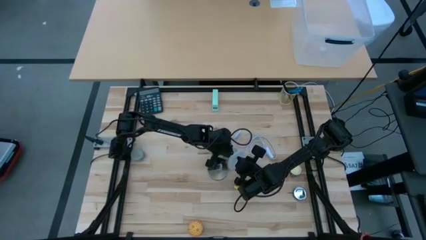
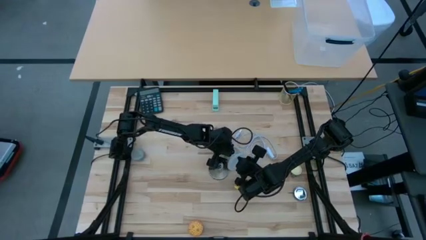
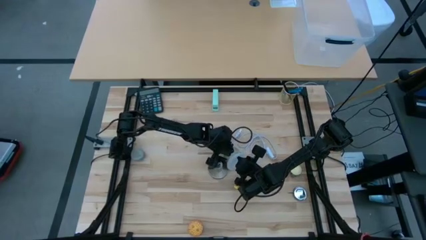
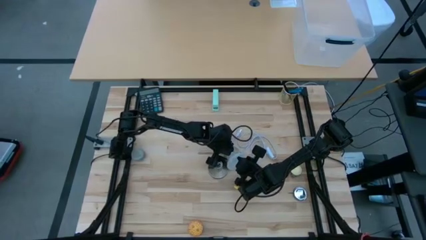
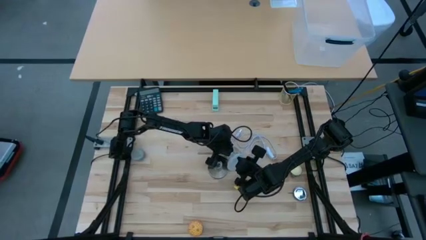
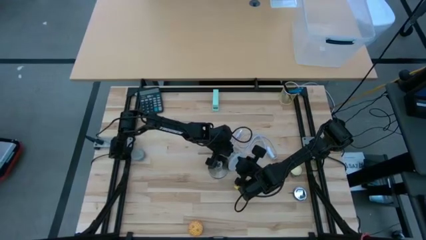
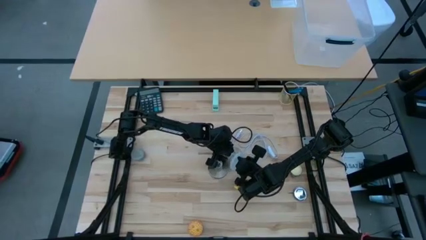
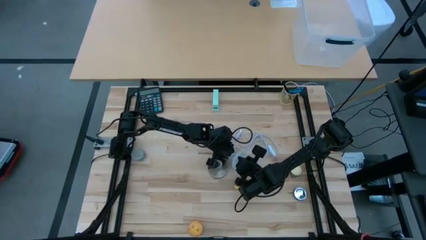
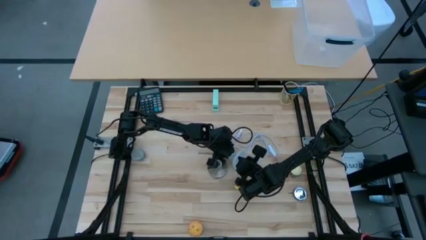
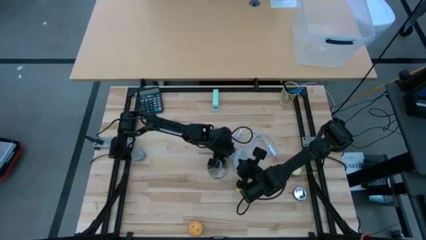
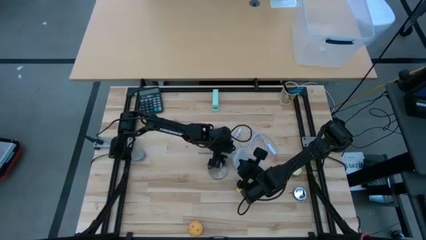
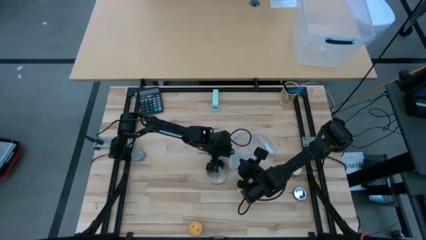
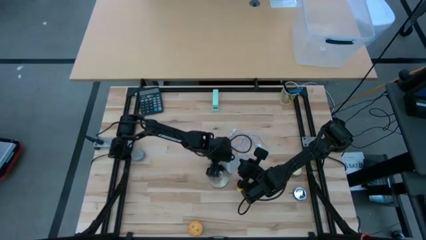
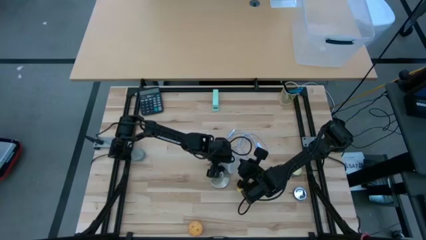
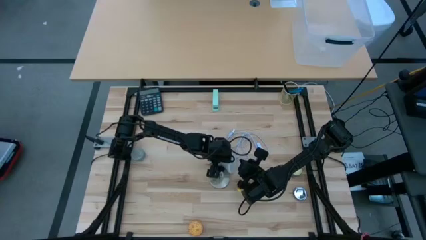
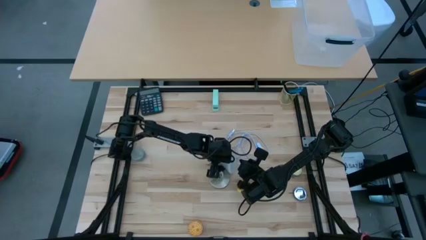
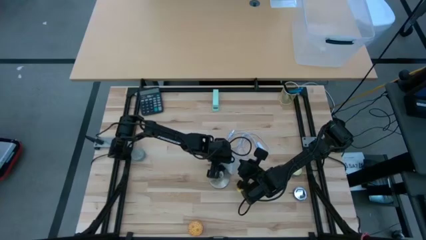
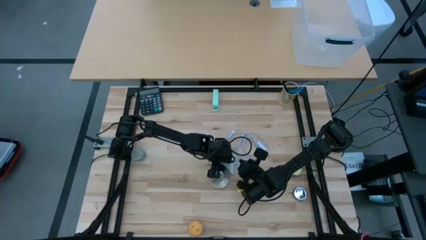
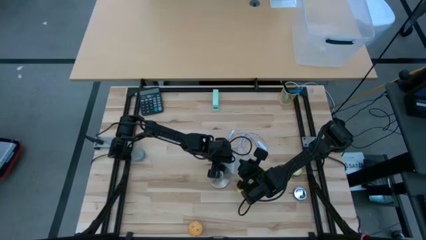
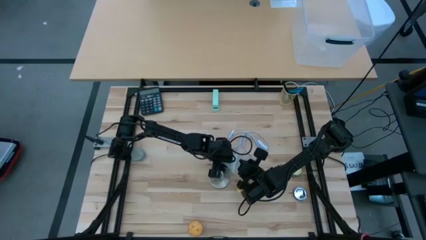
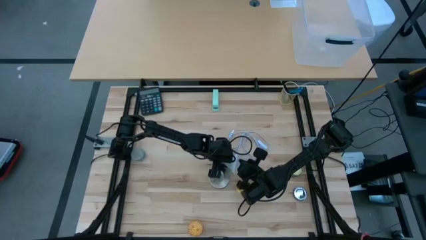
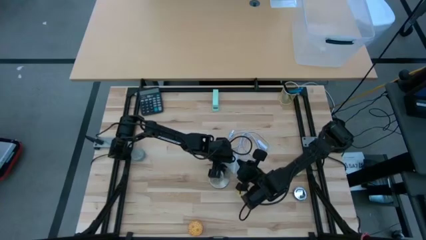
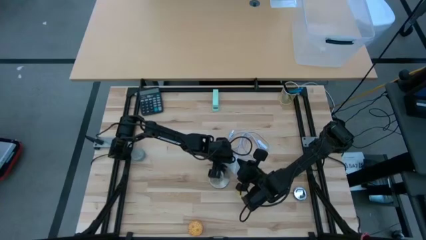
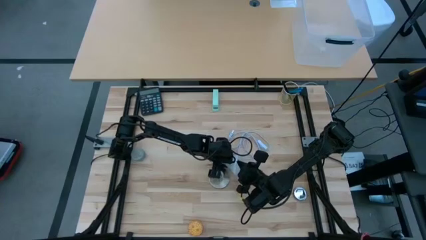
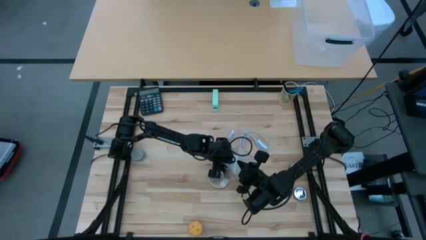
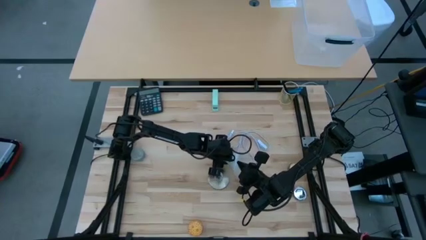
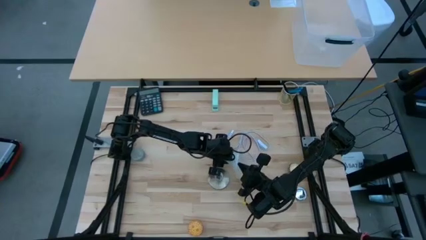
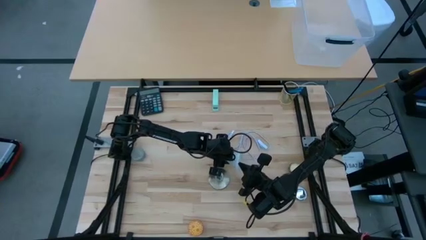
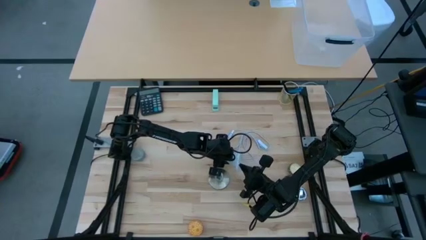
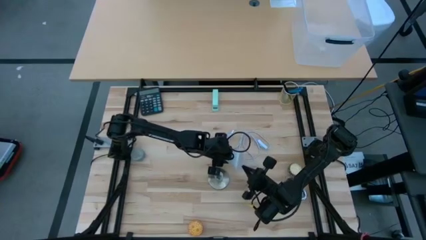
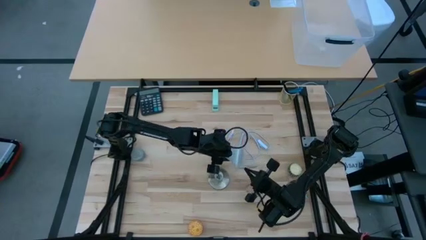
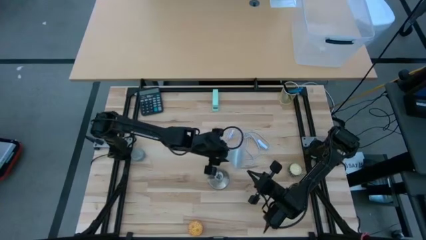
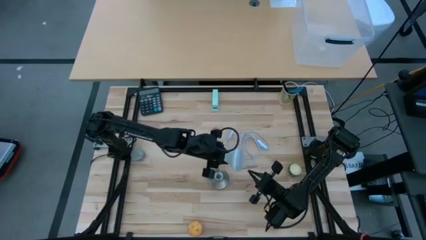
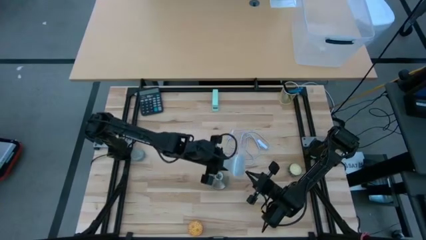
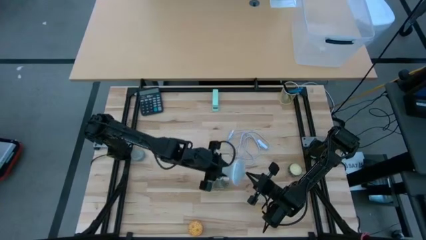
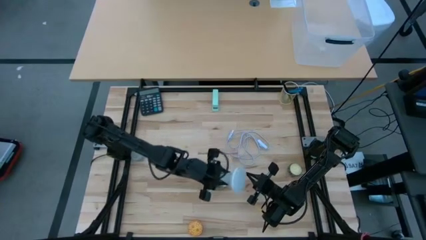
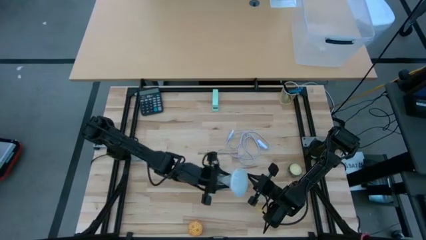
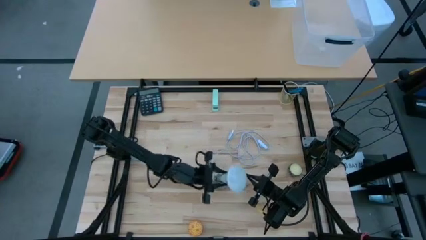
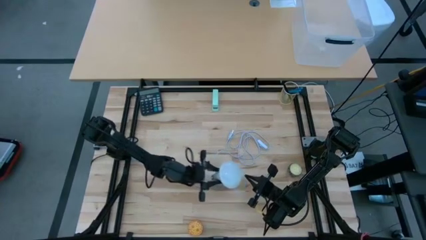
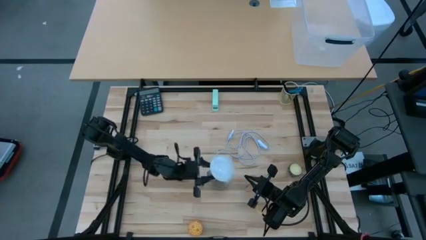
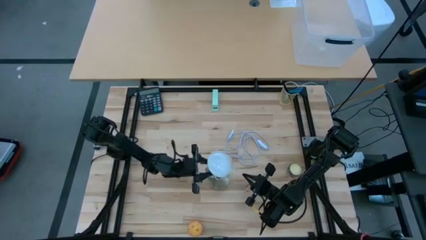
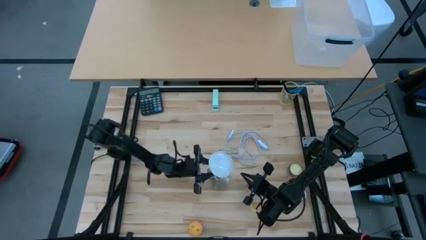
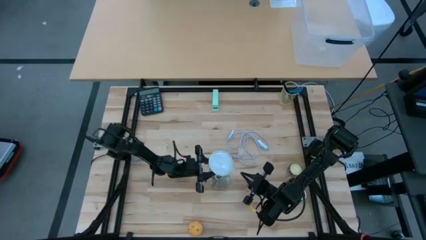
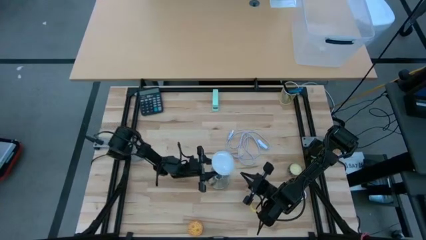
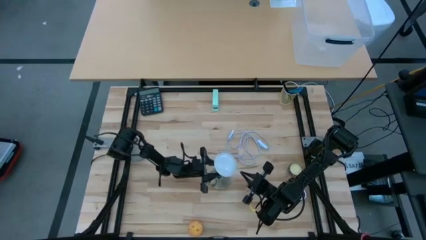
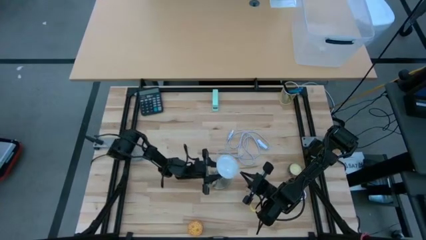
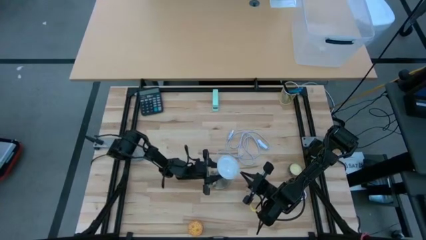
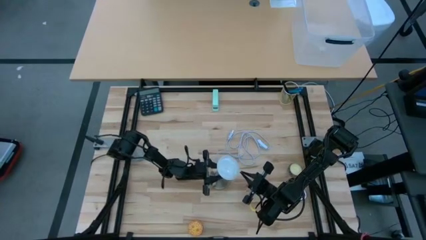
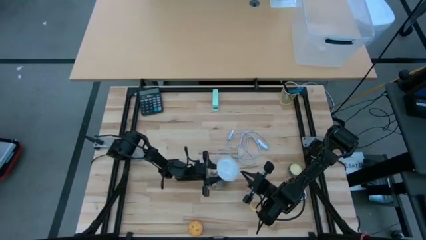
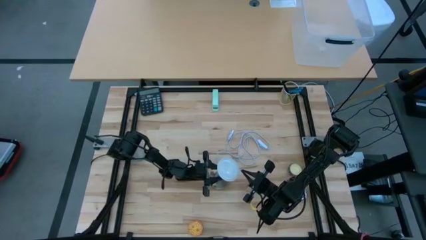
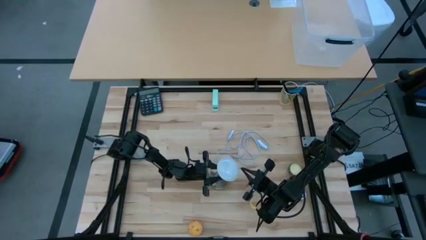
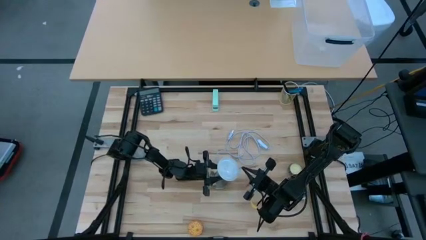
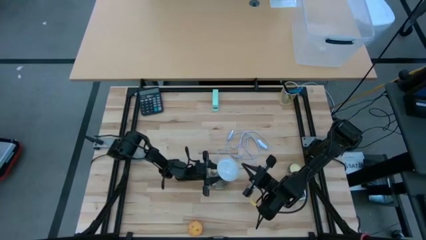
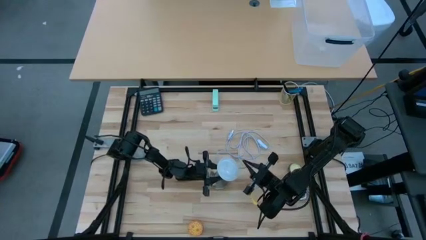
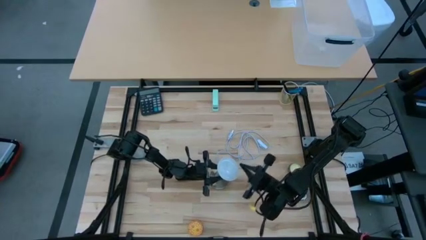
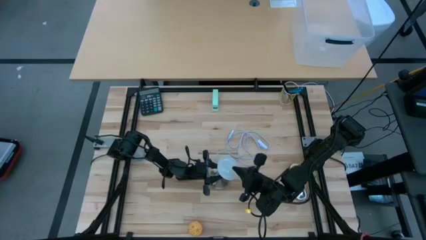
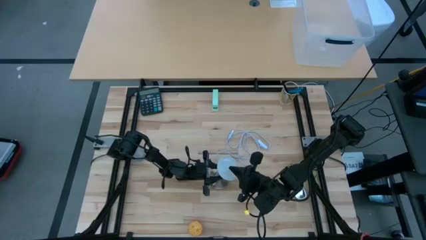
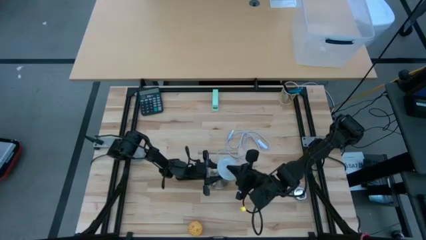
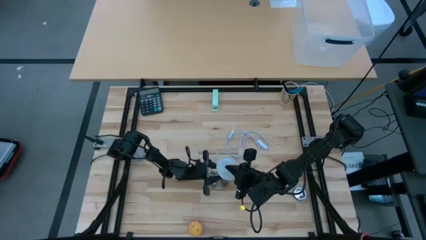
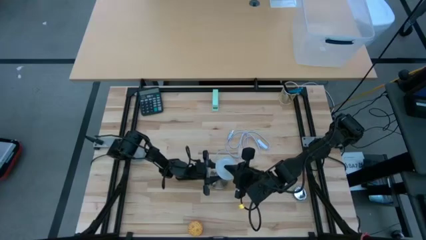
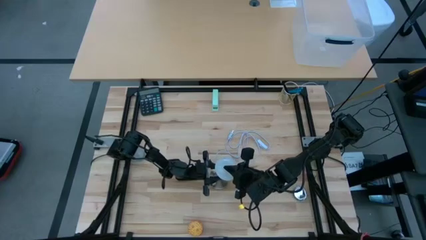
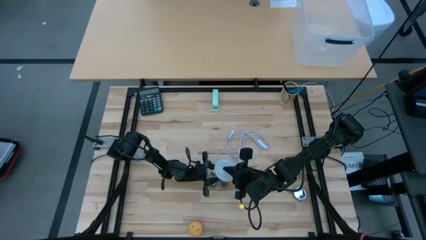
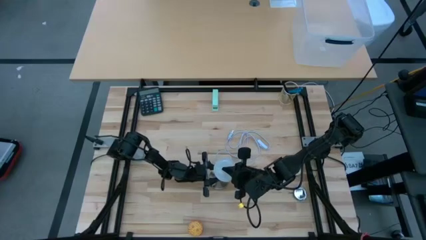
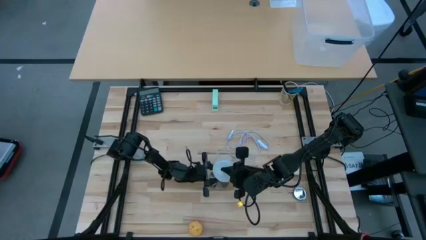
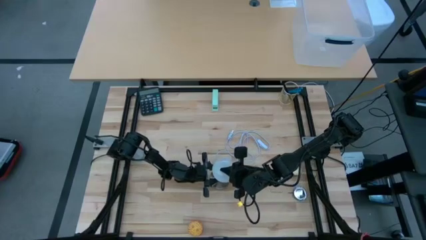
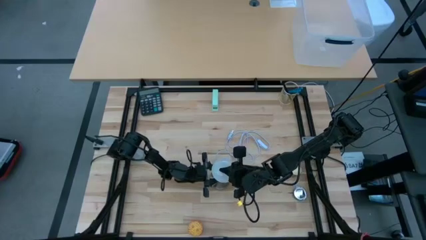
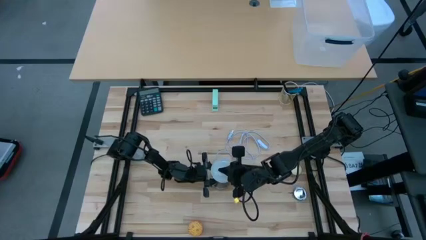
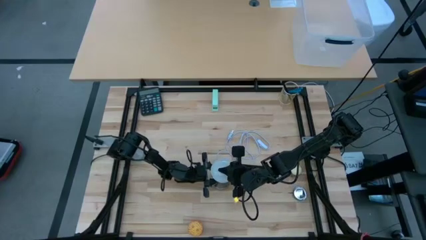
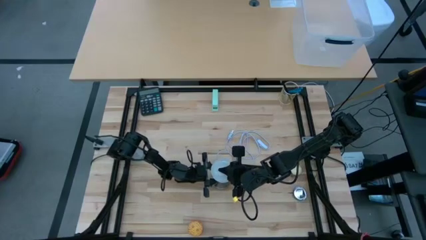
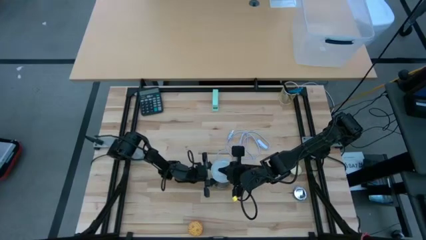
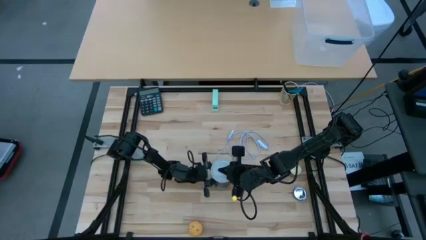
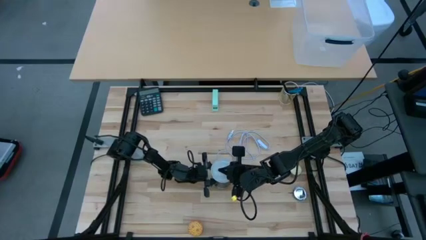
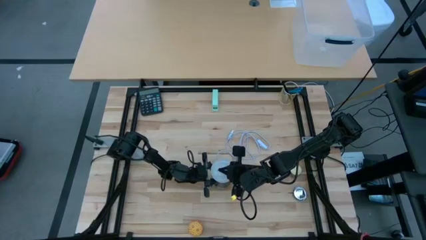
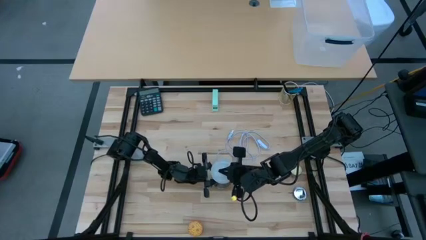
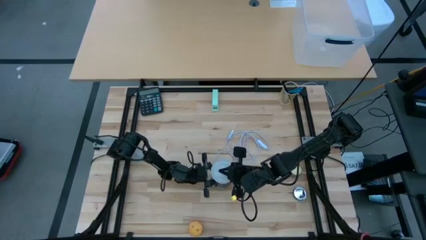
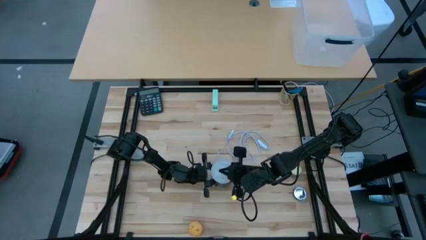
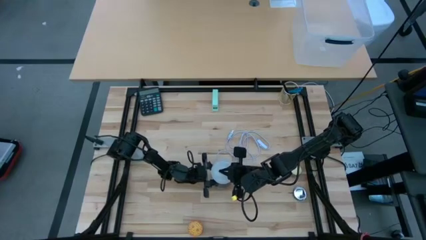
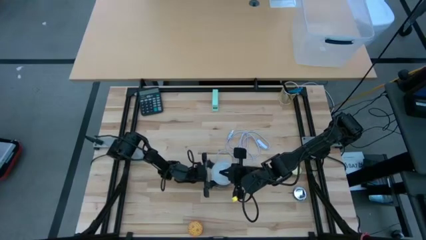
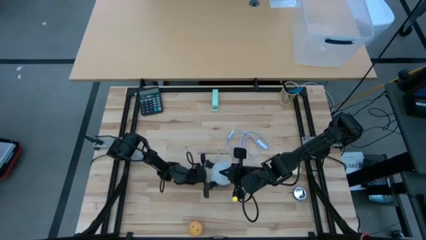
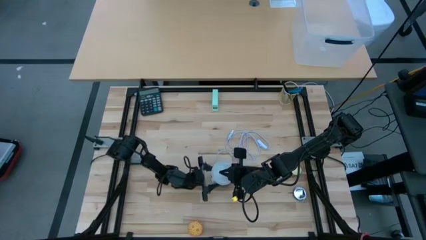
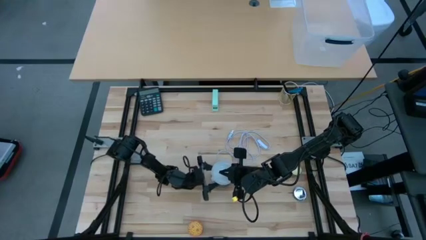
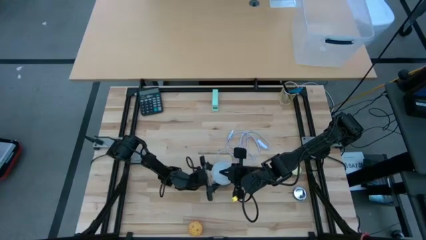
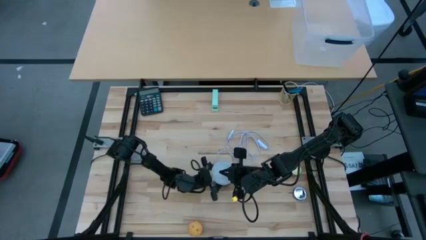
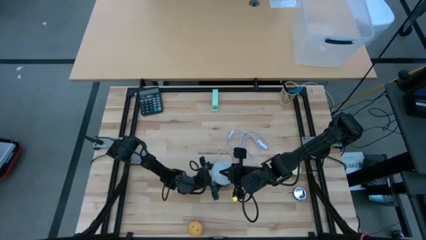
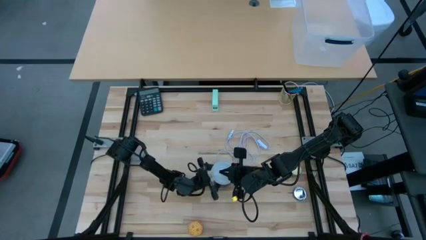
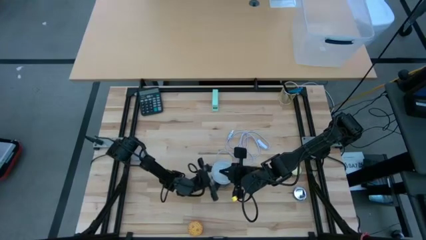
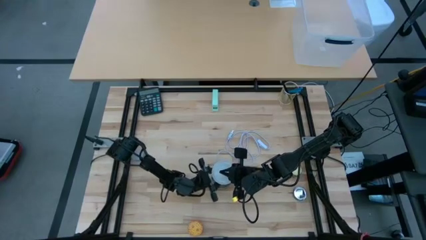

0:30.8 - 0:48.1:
Task: Screw lightbulb
Insert the white lightbulb into the silver lamp
